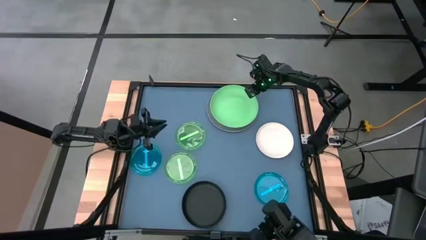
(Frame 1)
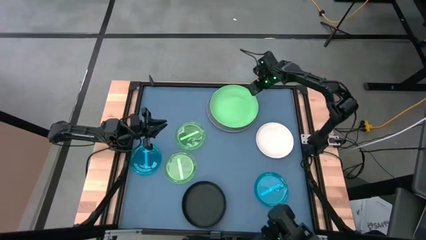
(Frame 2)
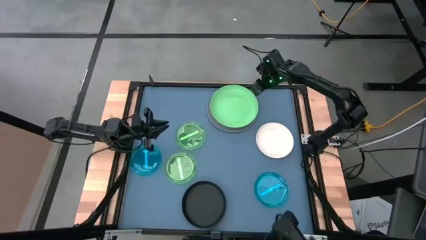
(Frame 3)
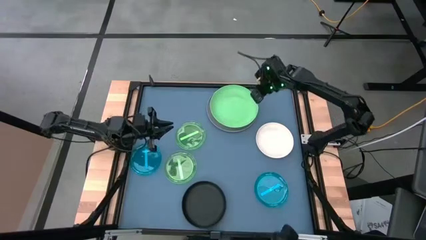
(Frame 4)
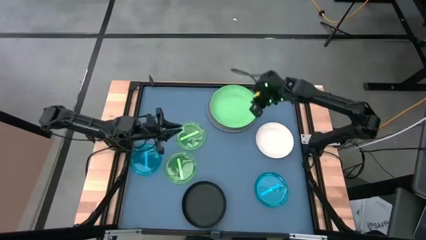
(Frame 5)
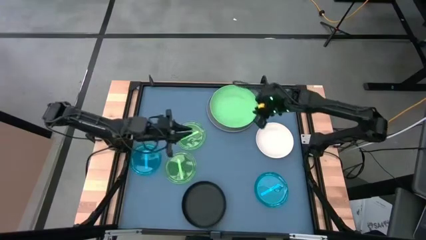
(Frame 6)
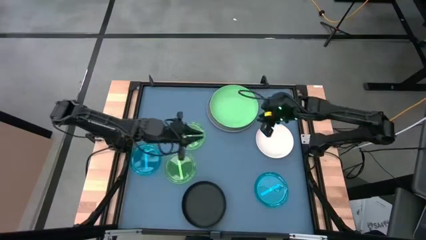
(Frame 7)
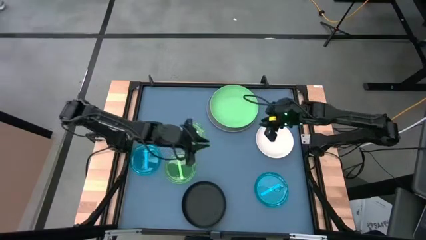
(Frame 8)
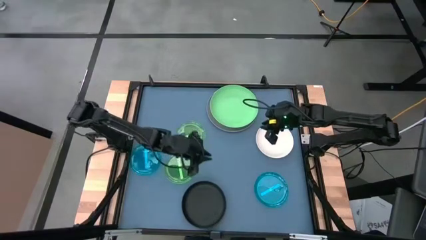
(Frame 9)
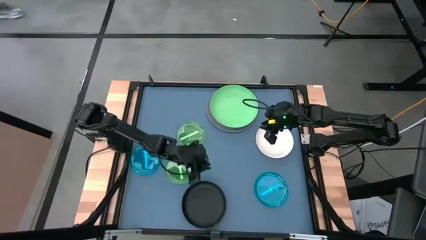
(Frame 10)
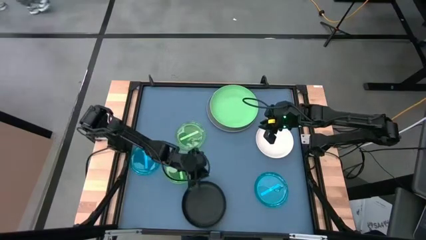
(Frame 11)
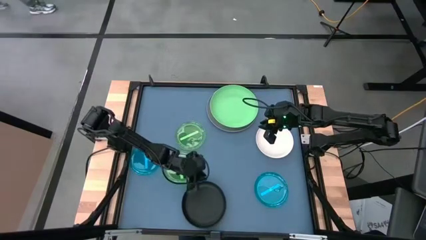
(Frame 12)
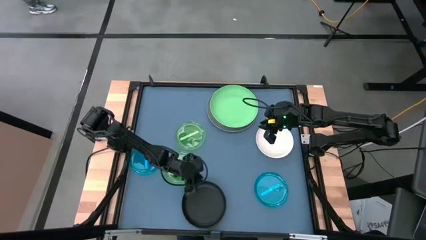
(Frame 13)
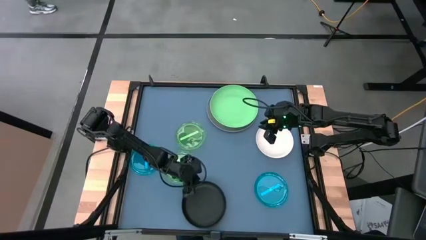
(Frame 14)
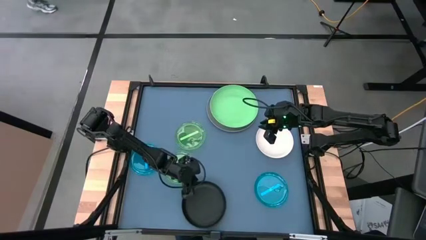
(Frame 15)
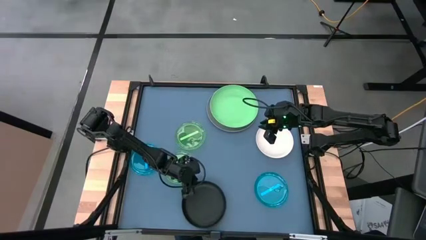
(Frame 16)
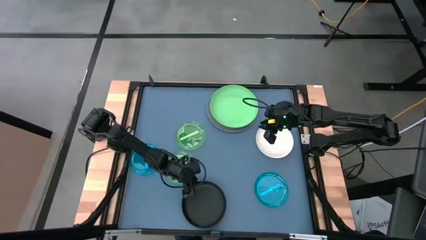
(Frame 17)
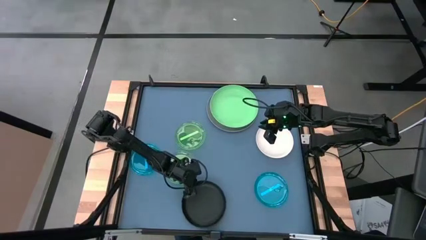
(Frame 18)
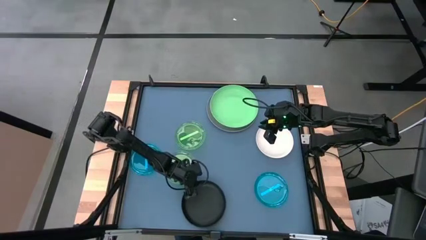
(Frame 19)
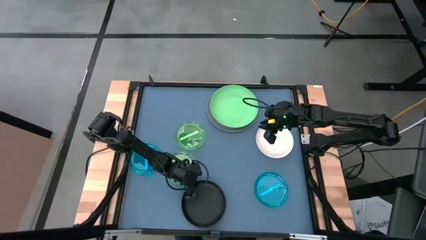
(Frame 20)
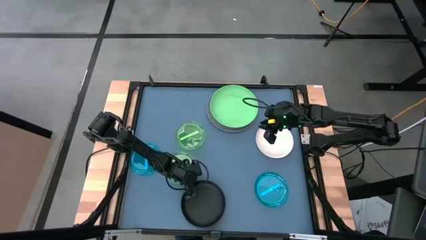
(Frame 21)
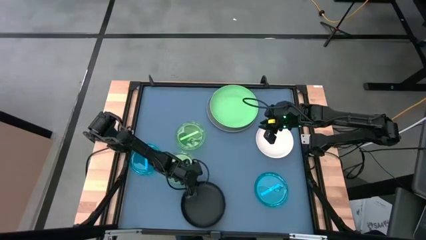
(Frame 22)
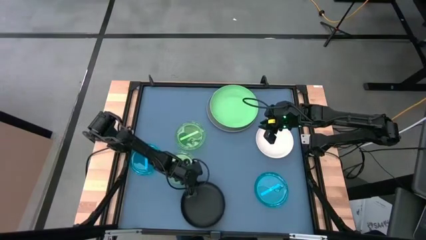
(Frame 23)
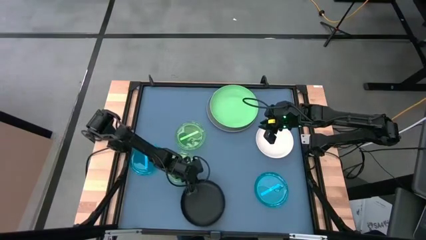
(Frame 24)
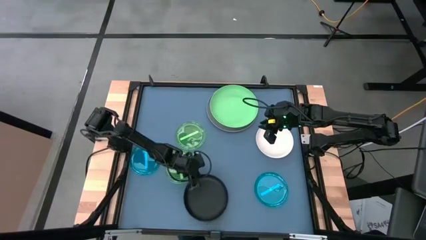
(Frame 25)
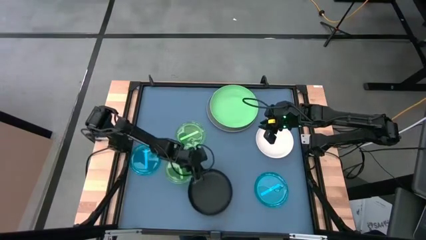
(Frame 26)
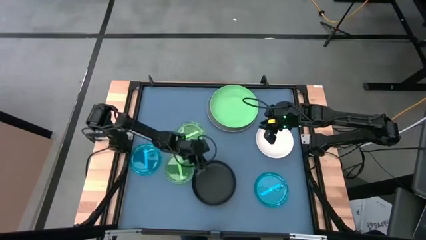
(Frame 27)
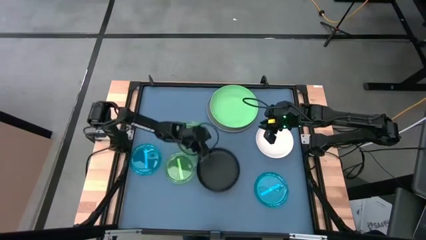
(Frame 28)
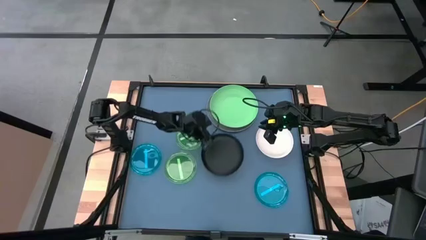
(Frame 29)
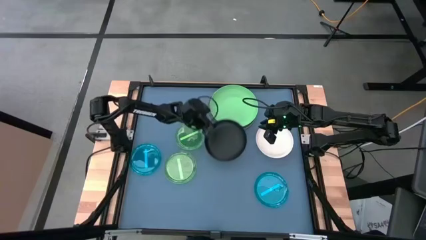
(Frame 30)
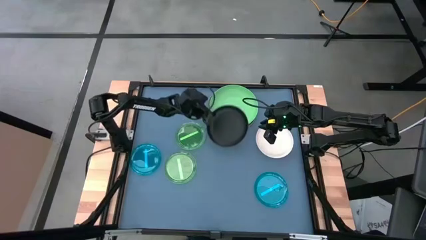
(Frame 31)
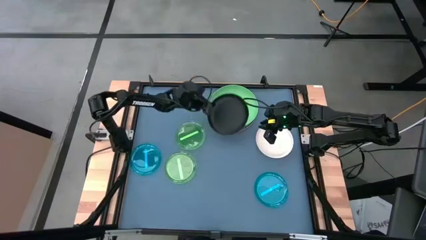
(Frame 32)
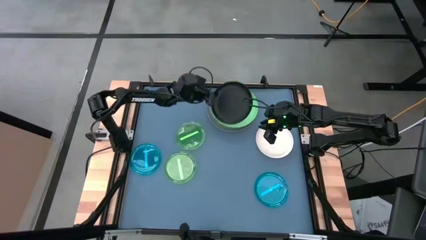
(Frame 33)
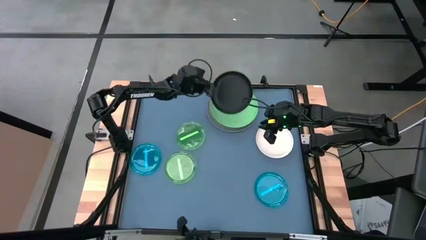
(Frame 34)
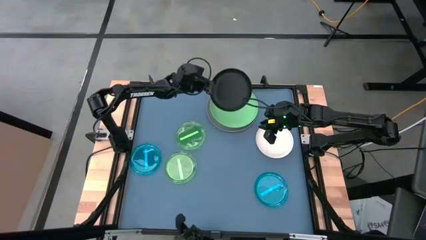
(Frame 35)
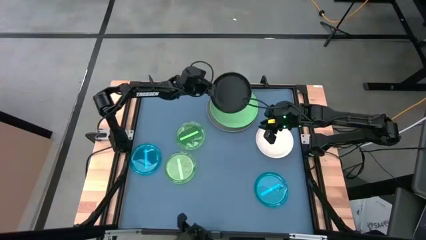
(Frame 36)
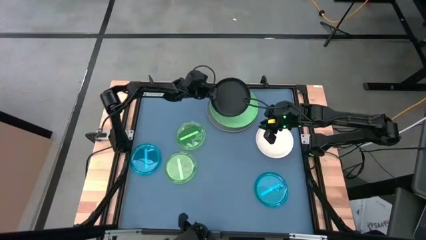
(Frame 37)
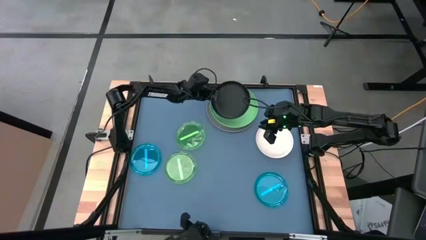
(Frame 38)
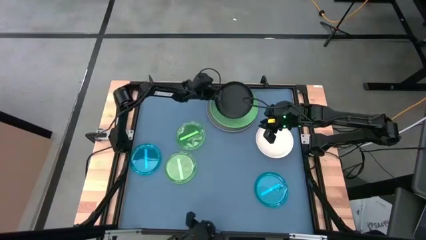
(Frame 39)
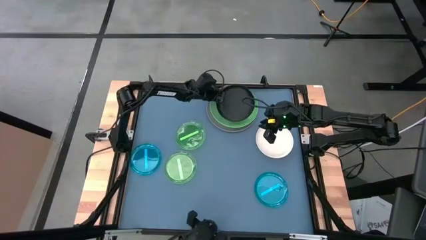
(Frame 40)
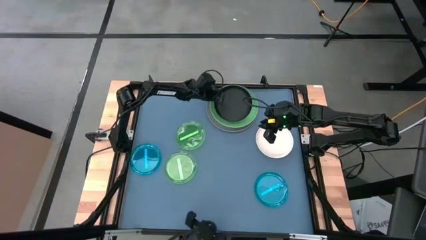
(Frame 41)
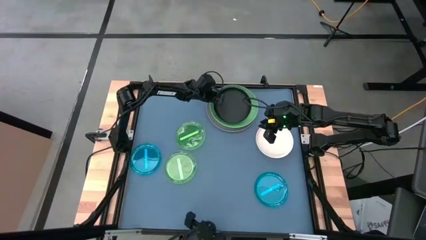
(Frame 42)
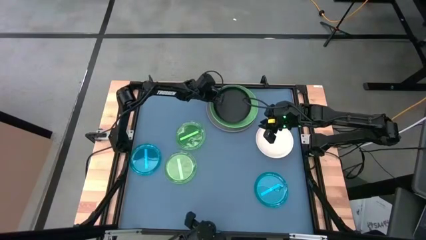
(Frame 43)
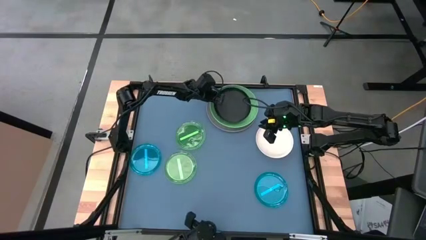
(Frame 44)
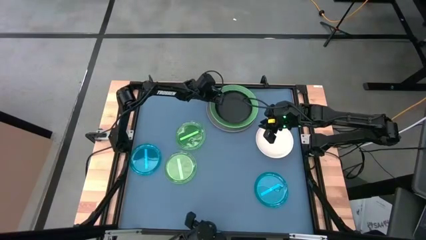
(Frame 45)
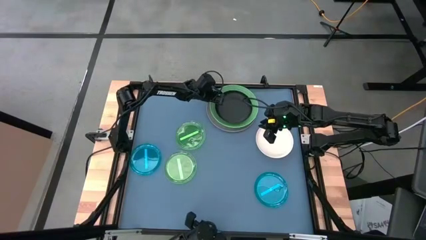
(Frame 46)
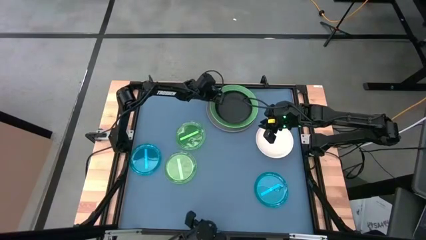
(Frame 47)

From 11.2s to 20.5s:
Task: Stack plastic plates
Stack the medium black plate on the large green plate

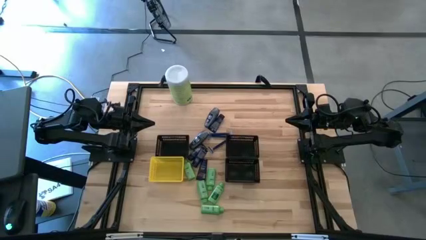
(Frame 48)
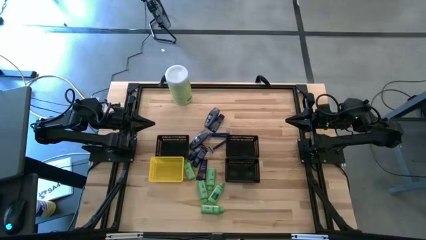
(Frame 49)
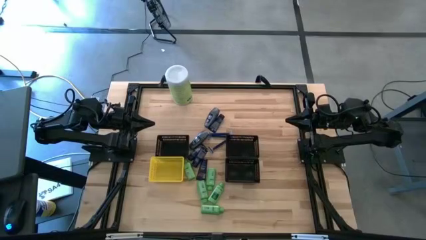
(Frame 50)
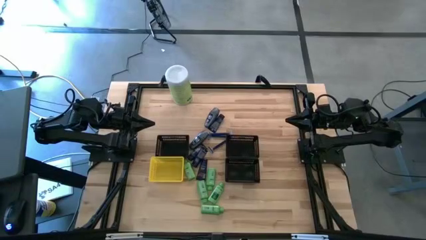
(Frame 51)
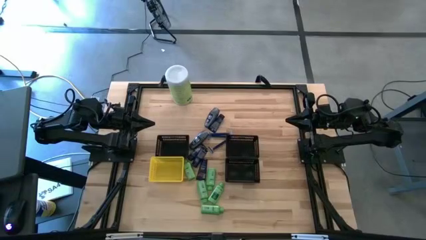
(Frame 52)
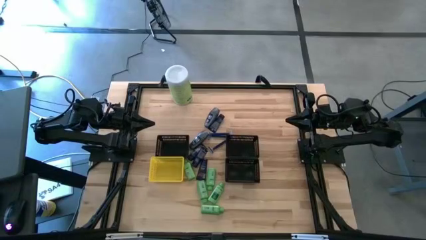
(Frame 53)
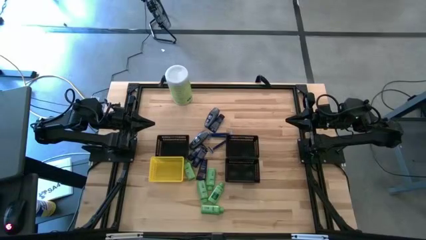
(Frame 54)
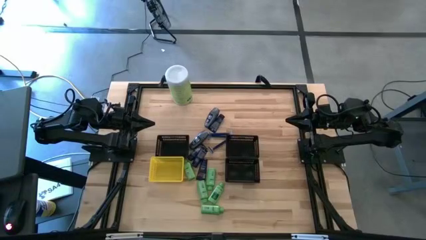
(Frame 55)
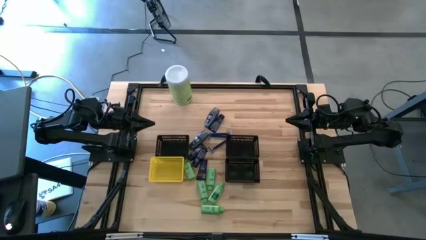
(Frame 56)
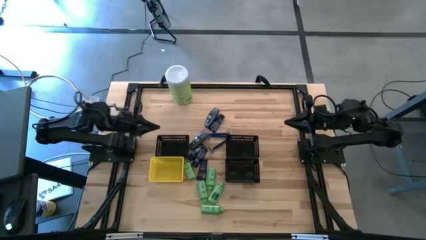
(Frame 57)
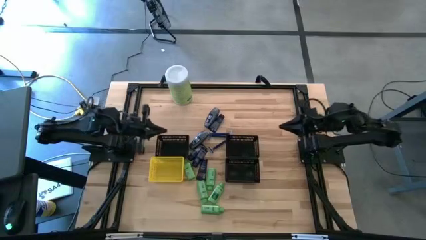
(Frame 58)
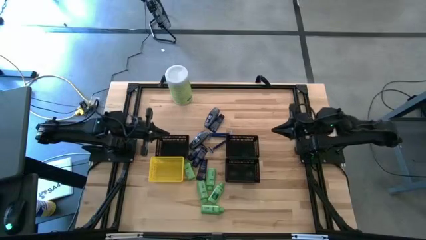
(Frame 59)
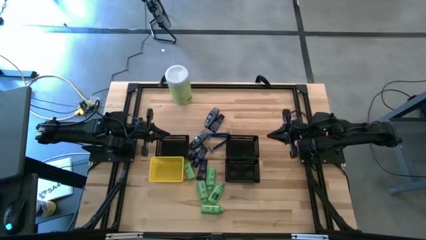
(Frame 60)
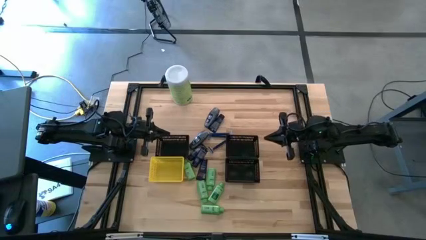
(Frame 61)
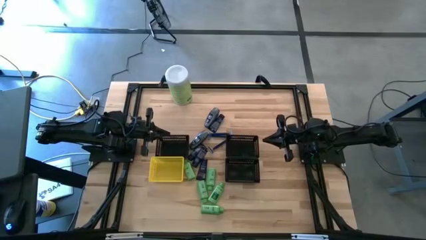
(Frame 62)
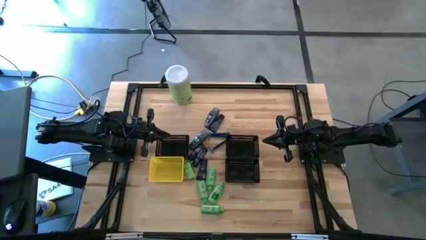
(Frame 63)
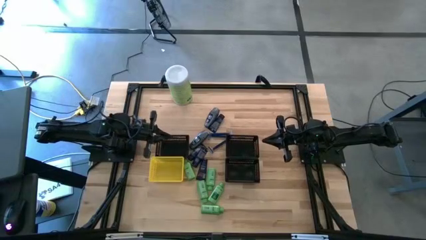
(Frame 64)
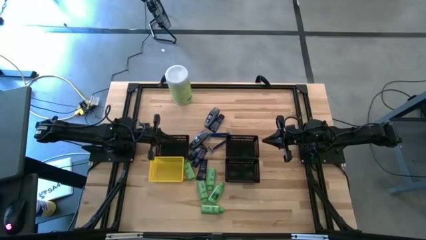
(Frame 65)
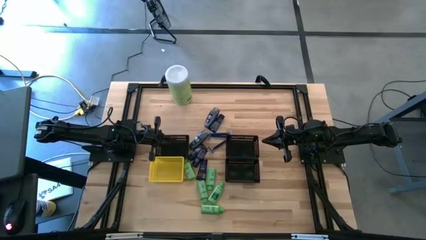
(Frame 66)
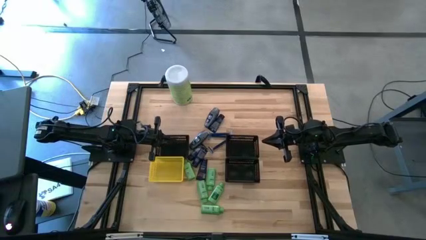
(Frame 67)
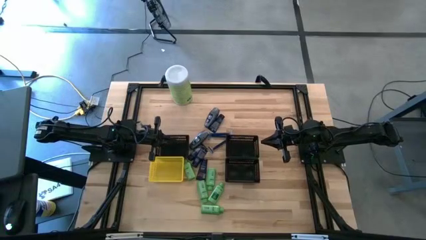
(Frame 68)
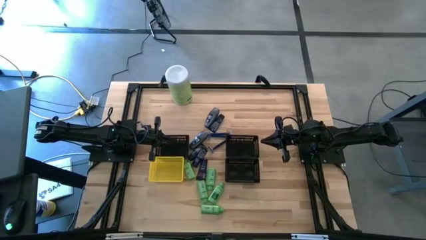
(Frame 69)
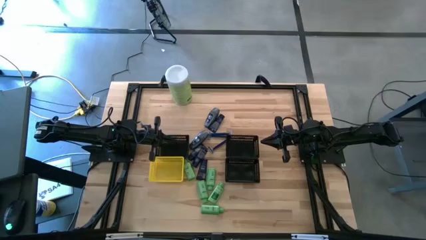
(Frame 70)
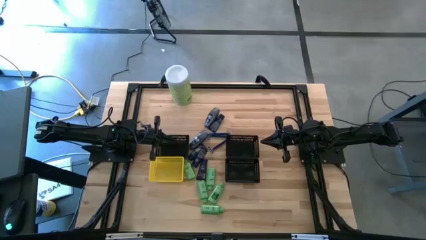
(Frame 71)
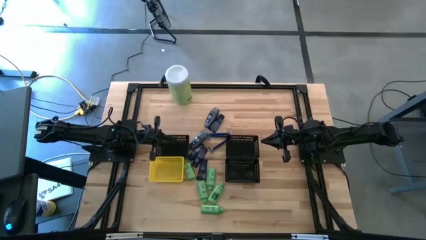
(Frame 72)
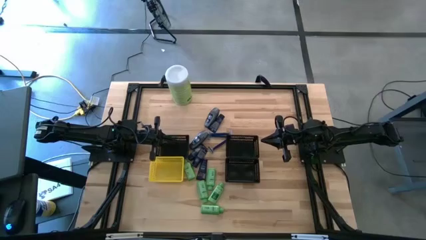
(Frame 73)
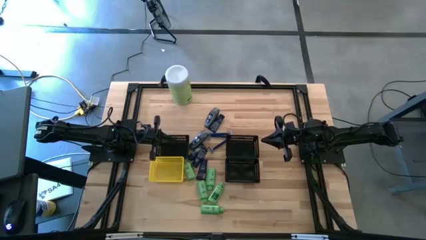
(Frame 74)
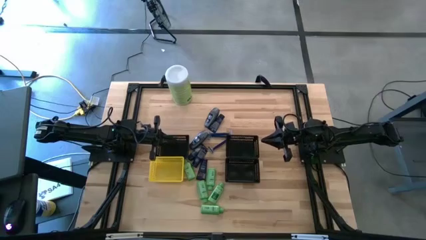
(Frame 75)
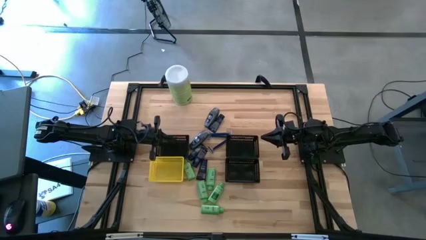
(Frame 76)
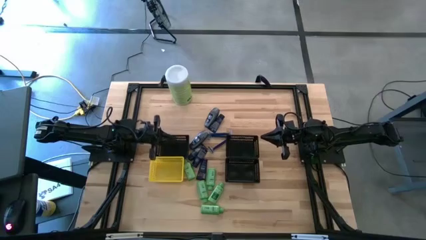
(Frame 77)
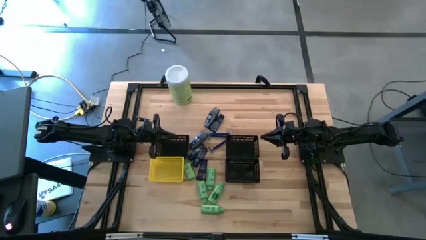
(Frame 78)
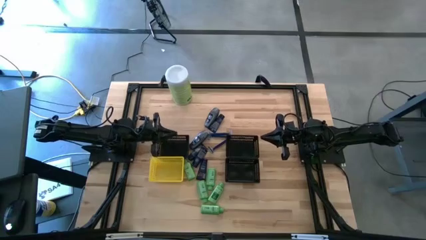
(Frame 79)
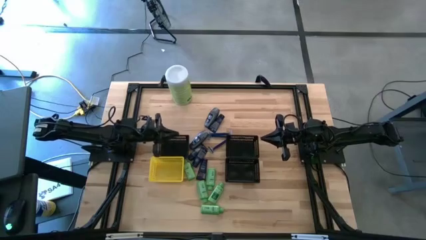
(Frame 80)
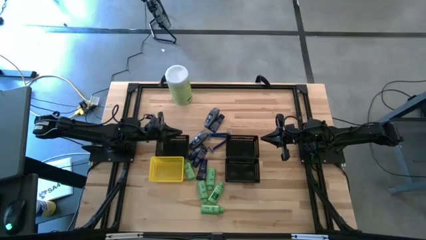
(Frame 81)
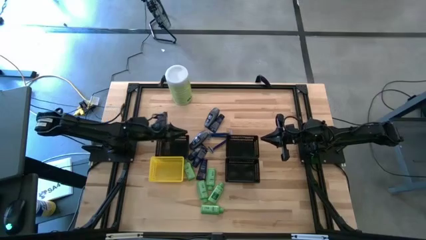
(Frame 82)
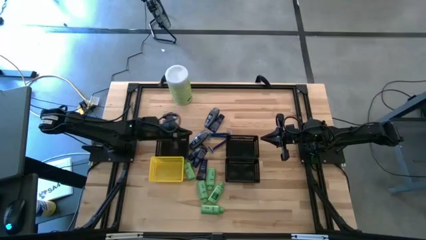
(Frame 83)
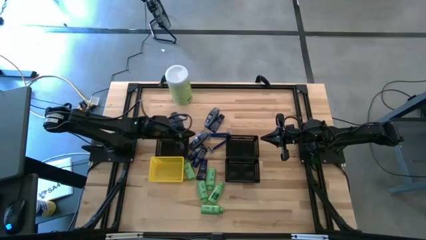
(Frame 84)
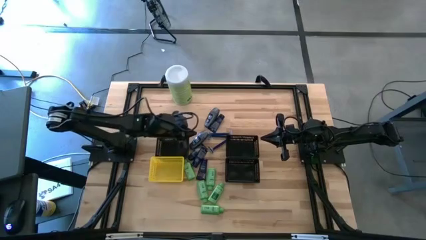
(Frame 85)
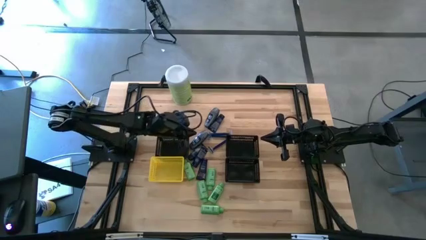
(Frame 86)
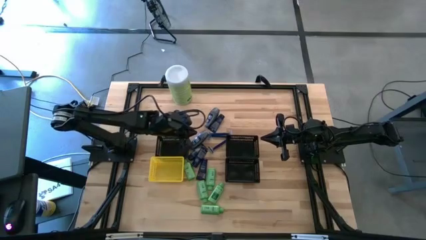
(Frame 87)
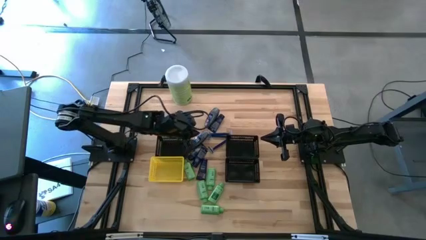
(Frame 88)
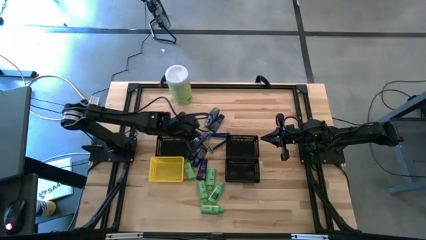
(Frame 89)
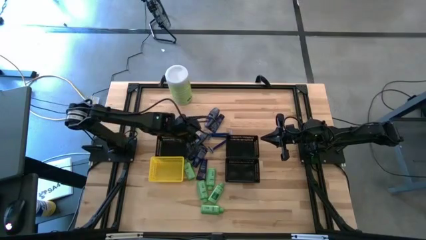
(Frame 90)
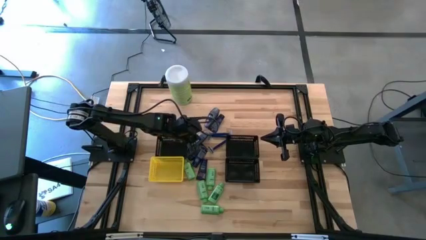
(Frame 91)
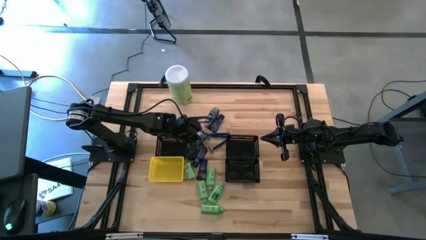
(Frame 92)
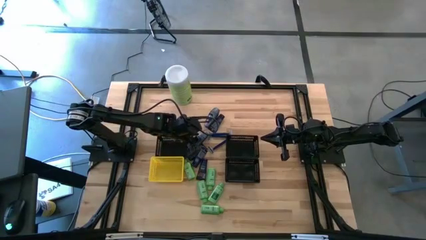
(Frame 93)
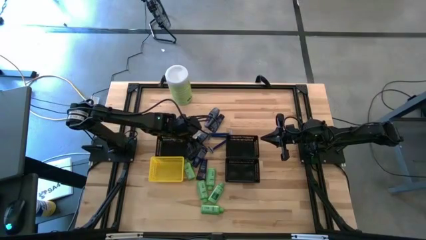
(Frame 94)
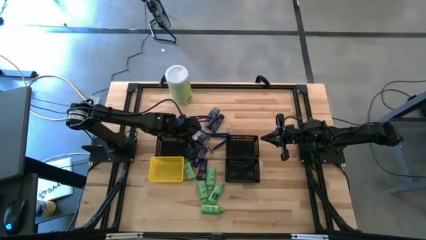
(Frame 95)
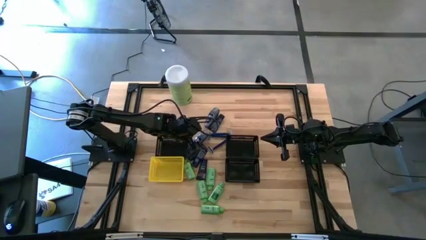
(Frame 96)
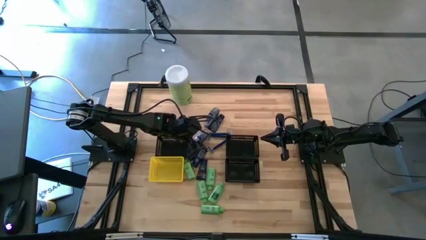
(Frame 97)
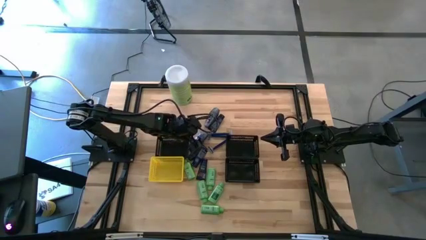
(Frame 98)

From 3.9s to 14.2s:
Task: Pick & Place Travel size toiletries
Put the bottom gray deodorant bottle into the top left black bin
